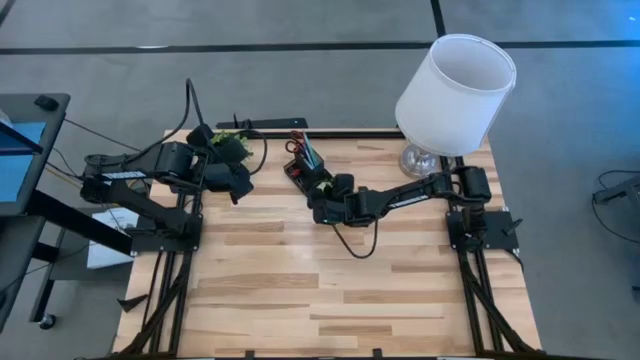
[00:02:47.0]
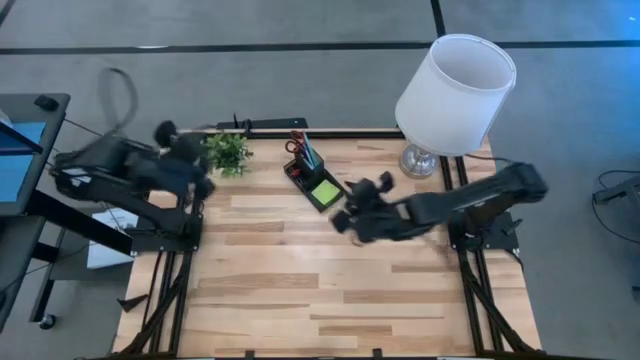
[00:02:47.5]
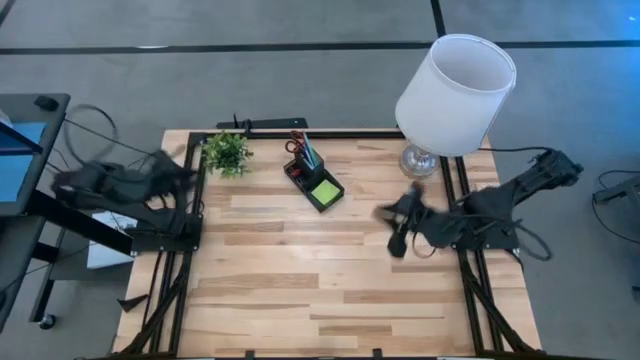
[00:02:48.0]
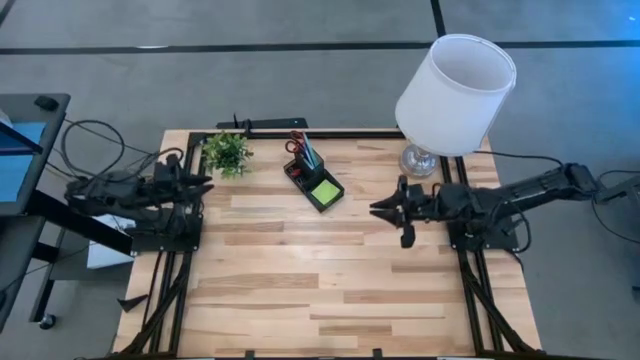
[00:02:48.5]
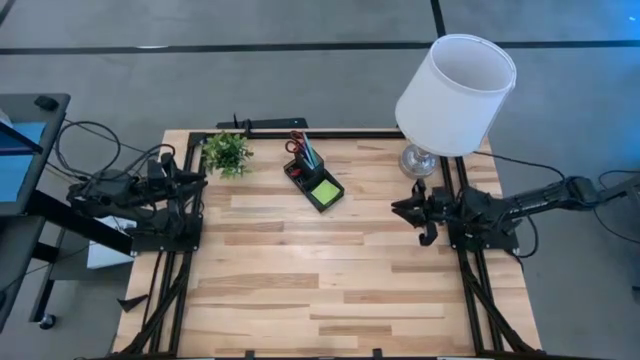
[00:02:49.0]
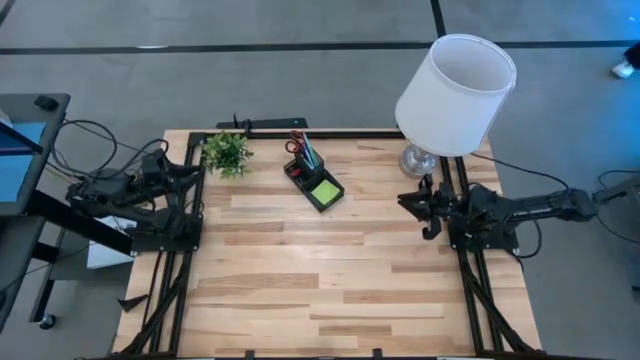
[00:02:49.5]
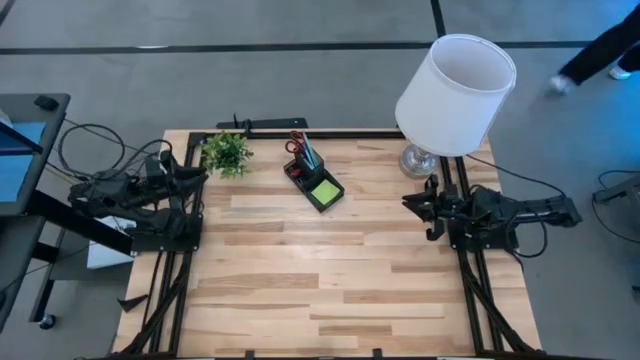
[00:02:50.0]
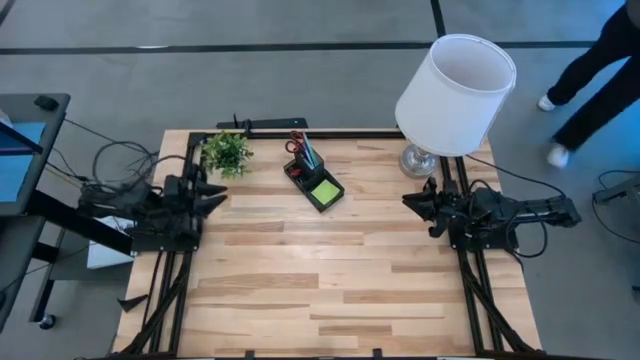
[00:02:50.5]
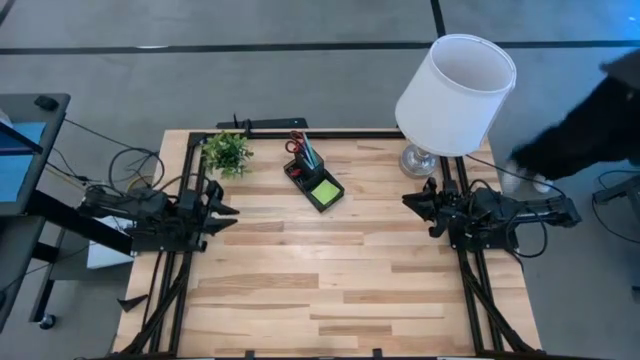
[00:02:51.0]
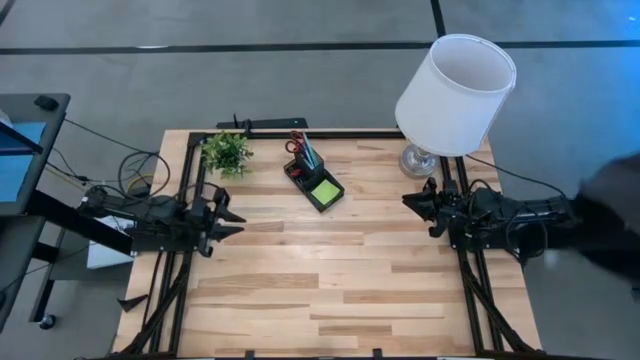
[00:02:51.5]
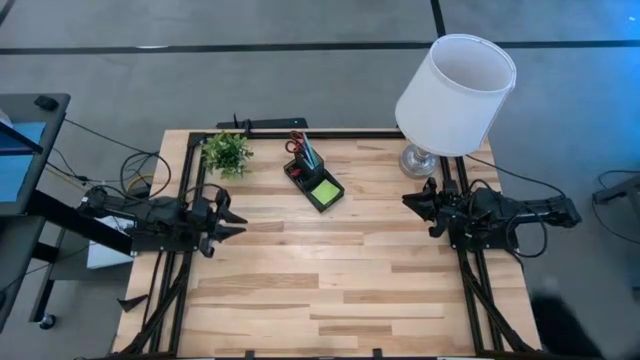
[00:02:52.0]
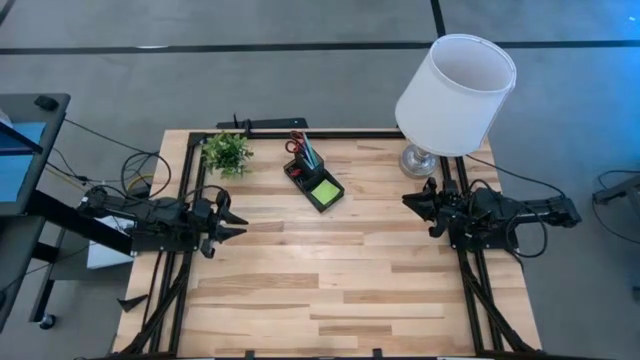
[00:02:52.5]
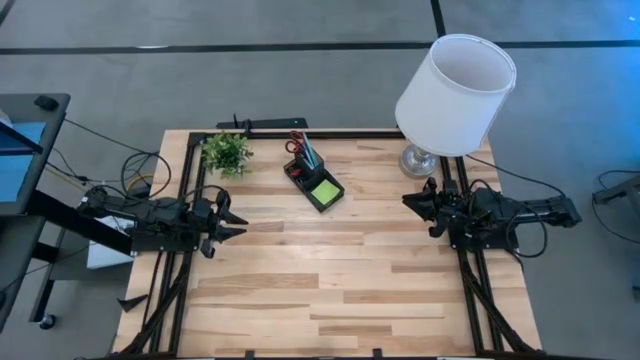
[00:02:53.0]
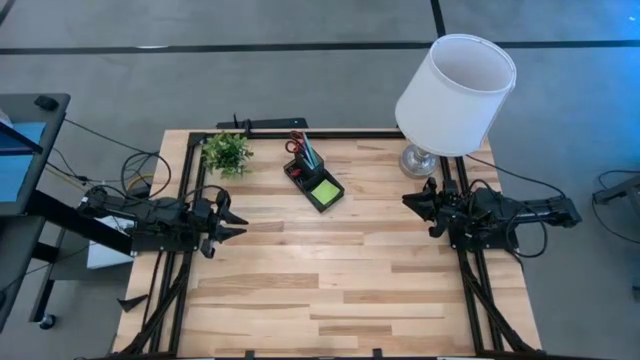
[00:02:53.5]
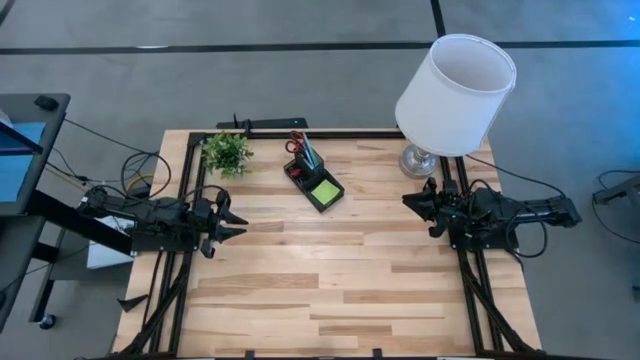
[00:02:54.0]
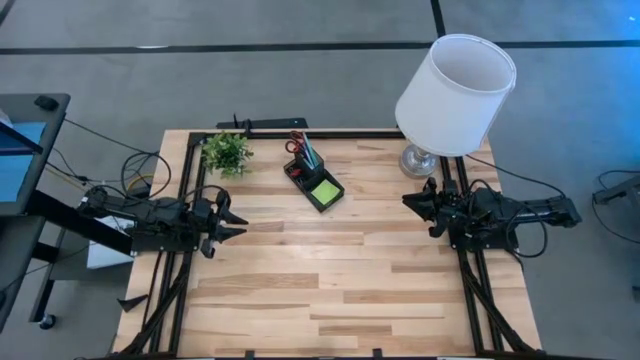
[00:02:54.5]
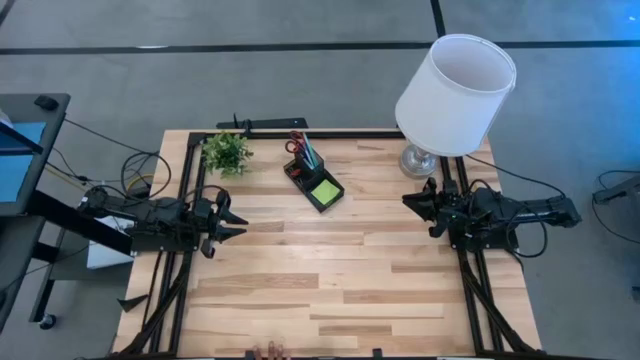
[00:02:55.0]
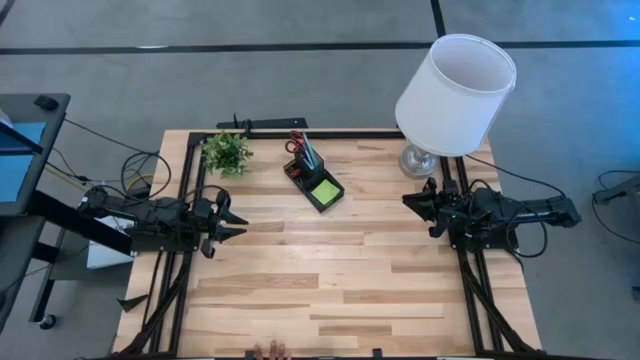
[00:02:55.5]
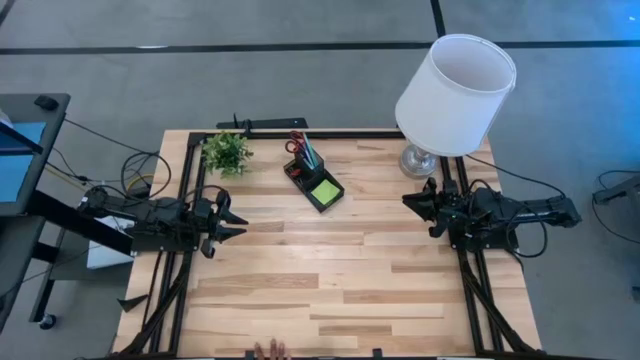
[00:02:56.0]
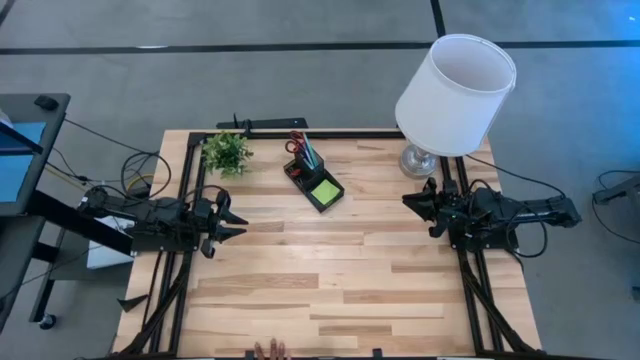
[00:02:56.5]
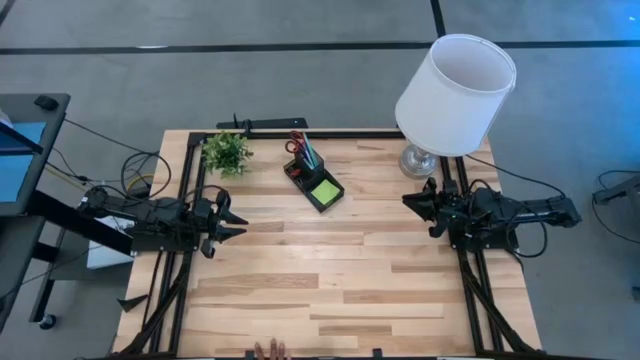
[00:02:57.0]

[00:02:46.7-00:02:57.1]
Task: Pick and place office supplies into organizer
Return to Home Position

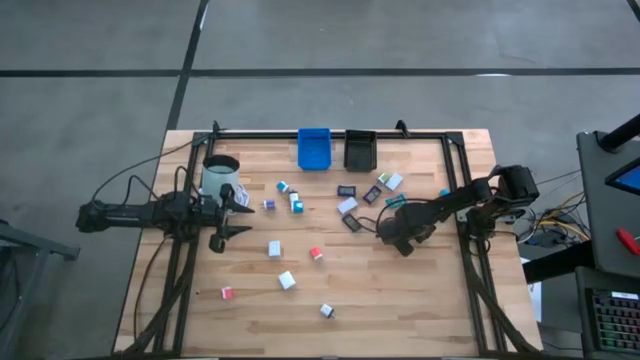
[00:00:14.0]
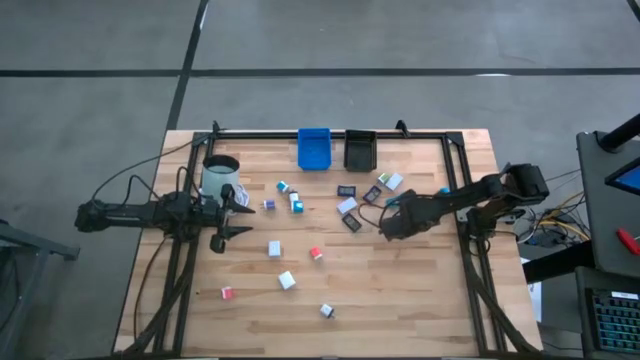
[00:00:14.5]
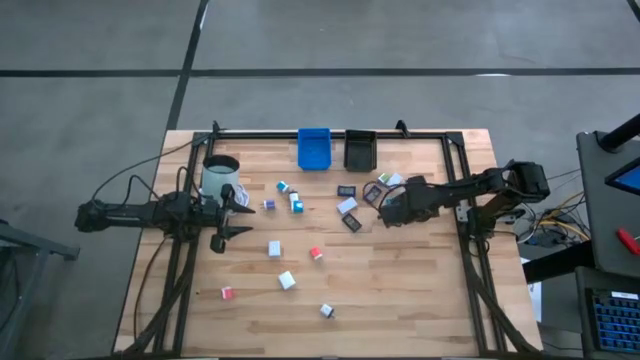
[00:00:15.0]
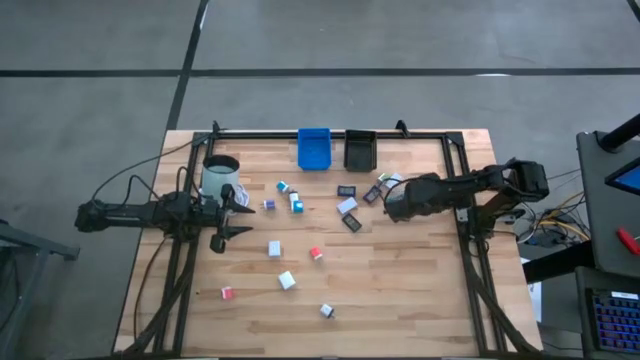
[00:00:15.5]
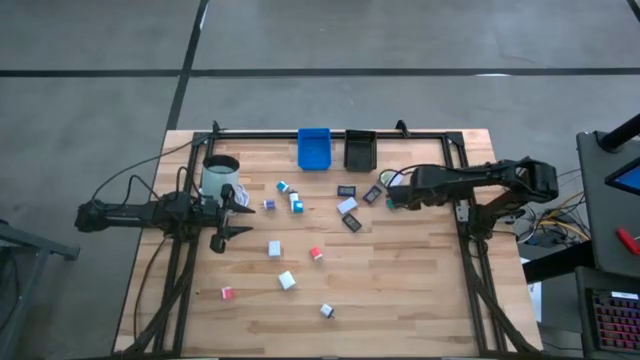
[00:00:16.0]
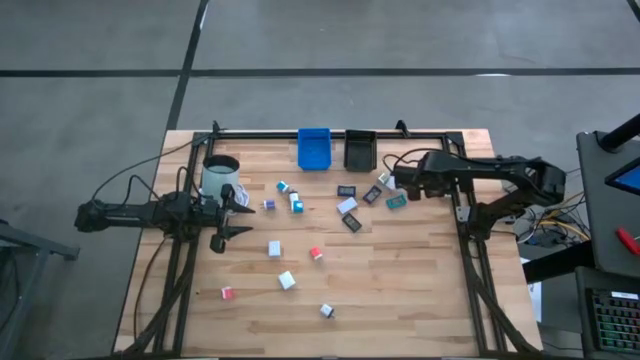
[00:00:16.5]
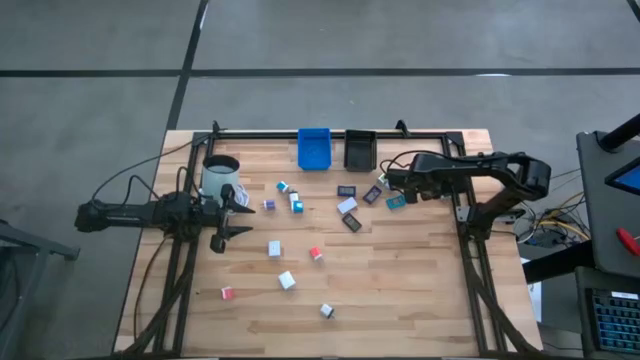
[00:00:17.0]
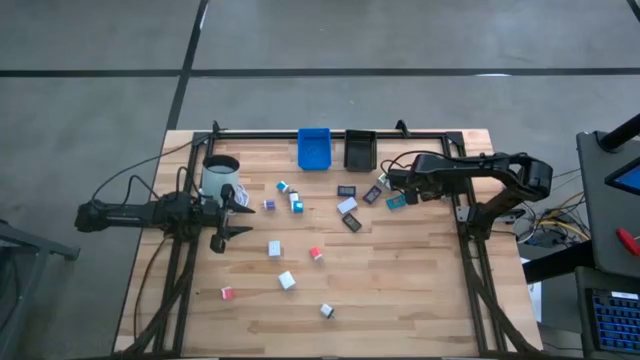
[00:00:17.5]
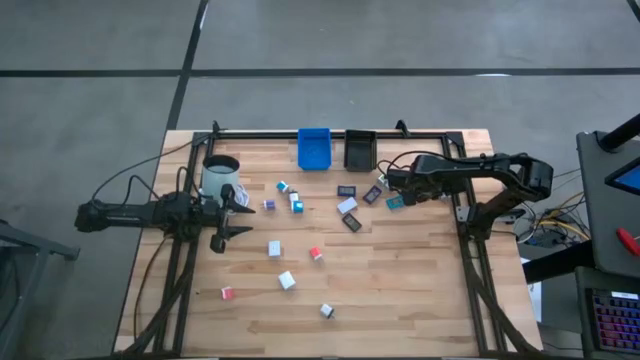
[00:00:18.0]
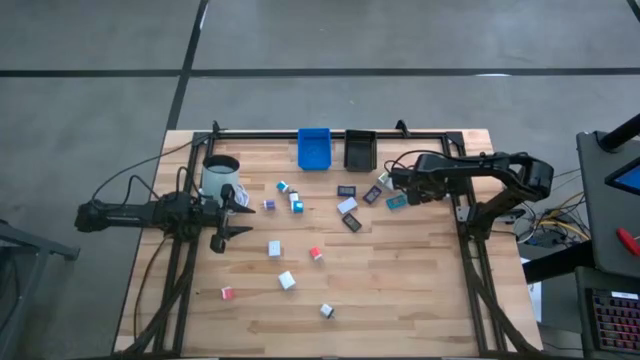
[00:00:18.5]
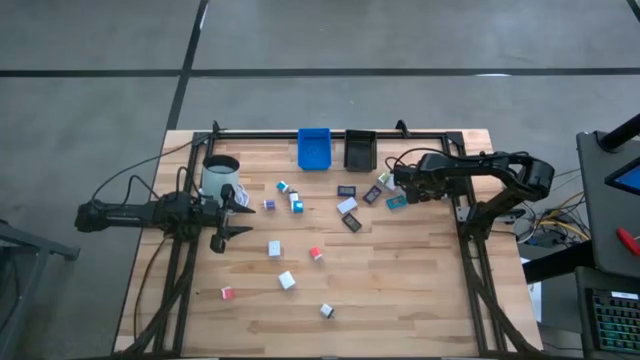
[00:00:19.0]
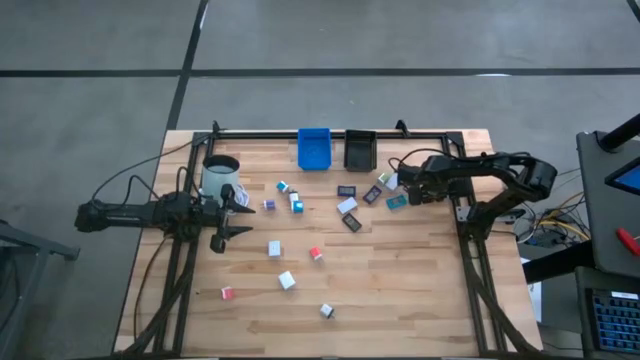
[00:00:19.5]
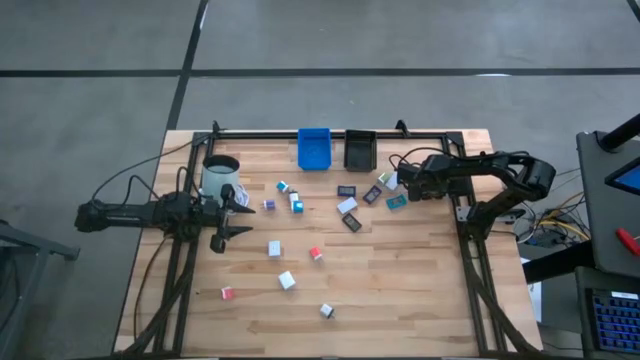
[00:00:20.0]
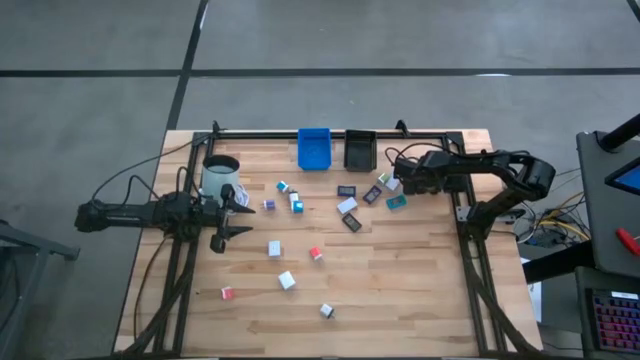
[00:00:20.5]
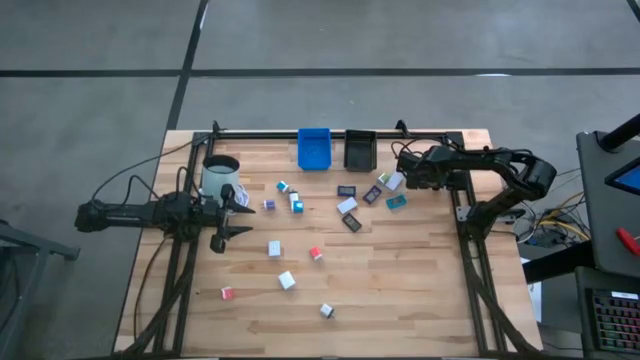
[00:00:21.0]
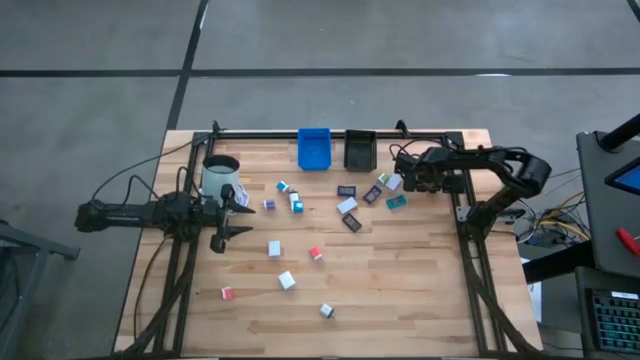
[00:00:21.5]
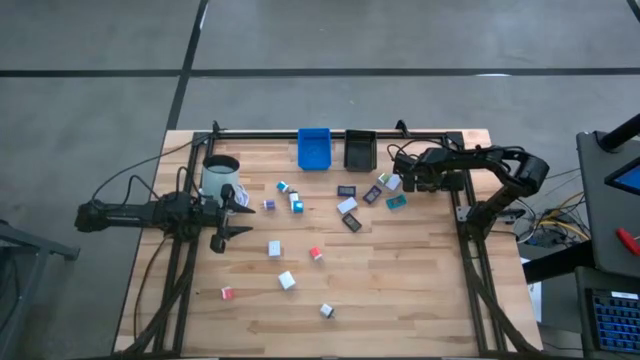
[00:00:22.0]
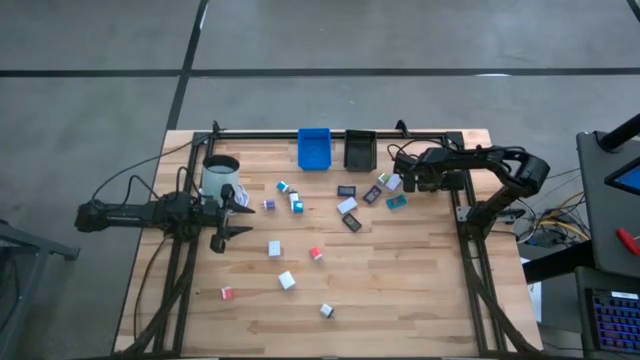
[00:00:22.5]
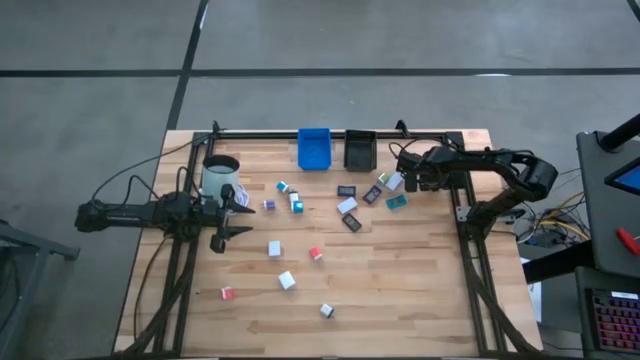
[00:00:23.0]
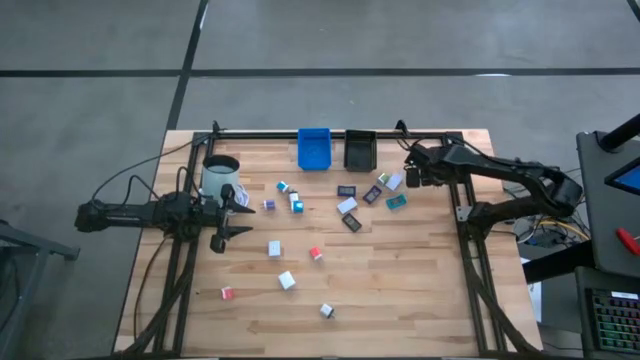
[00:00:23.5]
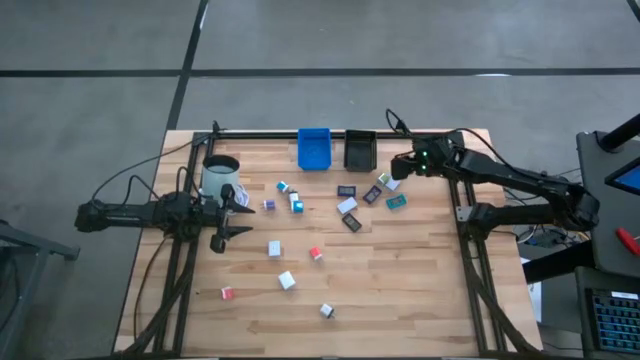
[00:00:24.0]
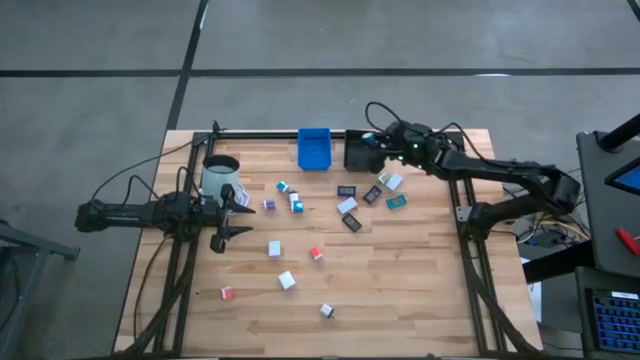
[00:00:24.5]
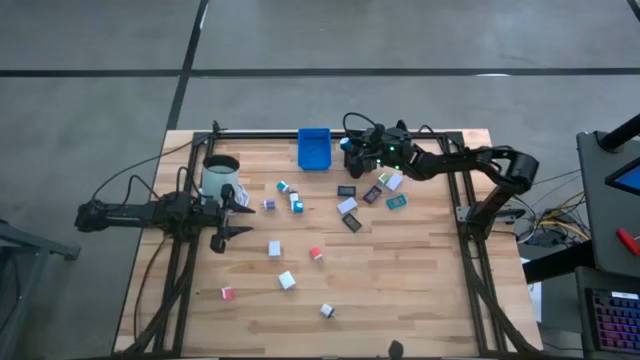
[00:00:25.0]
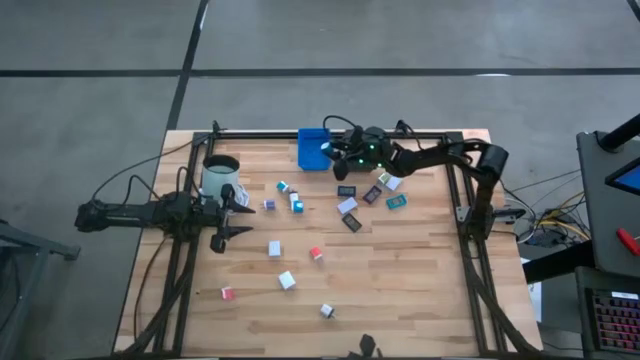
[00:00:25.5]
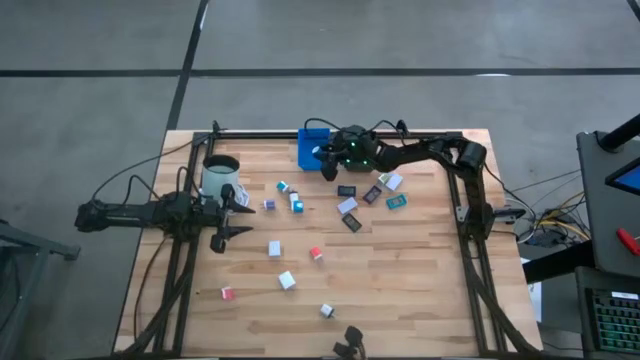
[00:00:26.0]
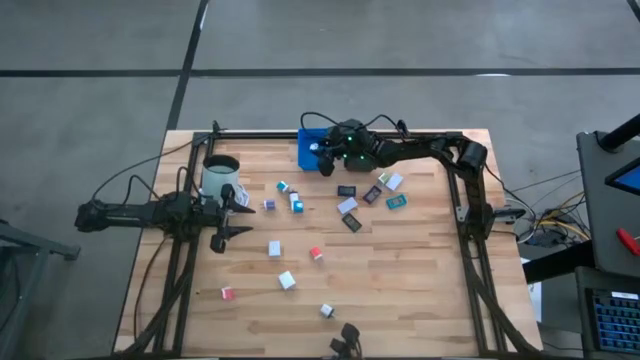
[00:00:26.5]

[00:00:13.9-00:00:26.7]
Task: Pick & Place Office items
Put the right small blue adapter into the blue basket
